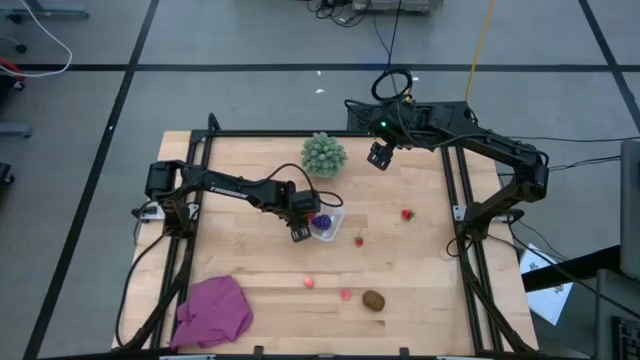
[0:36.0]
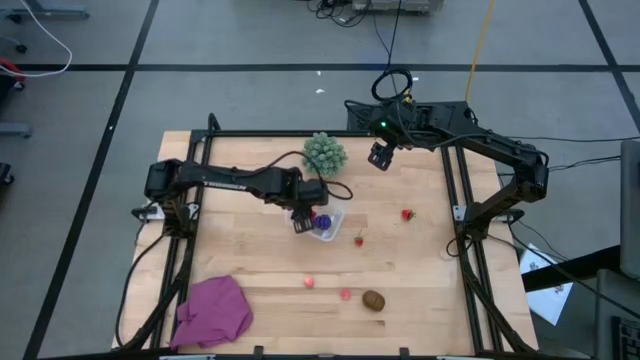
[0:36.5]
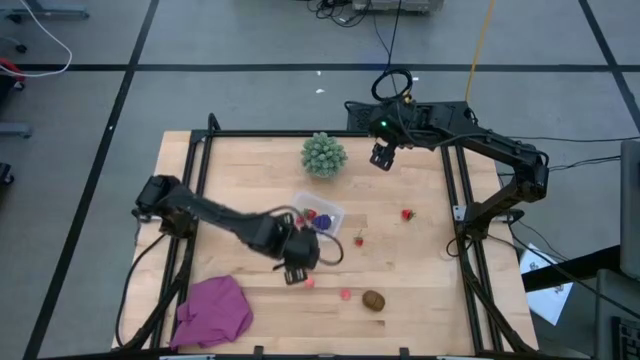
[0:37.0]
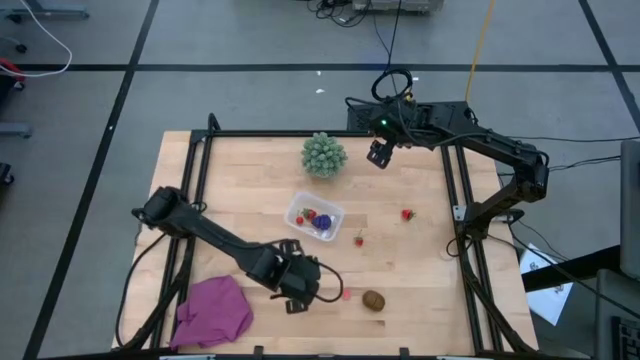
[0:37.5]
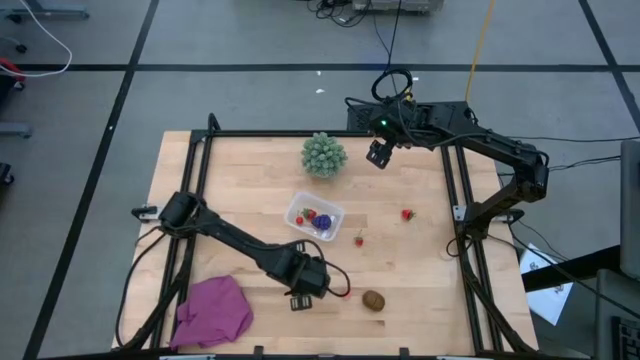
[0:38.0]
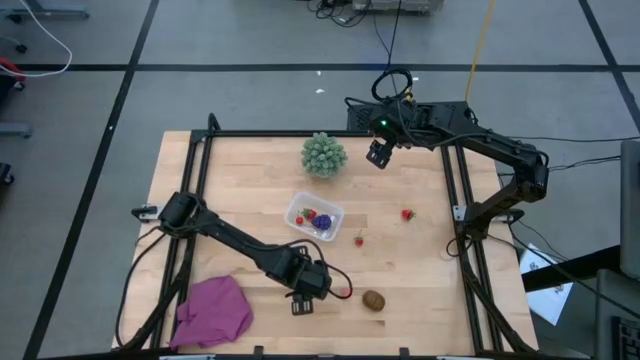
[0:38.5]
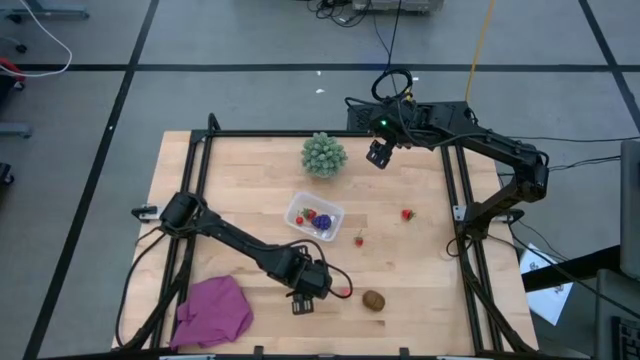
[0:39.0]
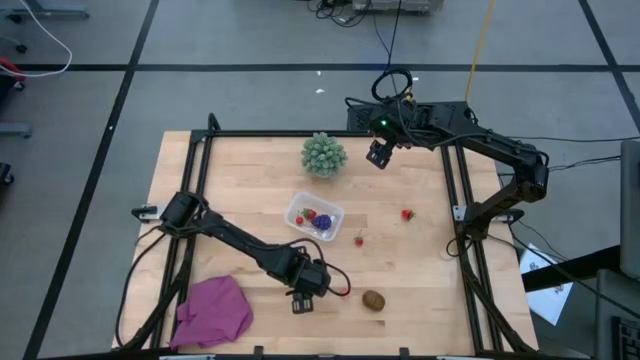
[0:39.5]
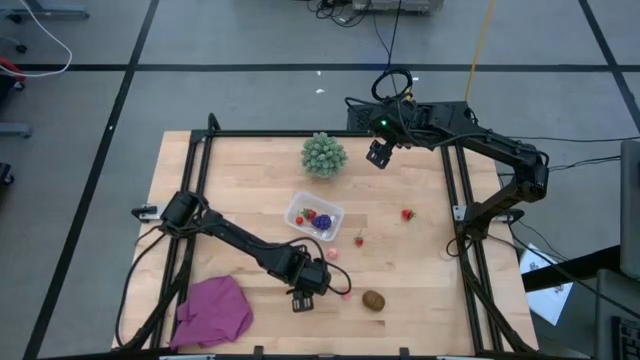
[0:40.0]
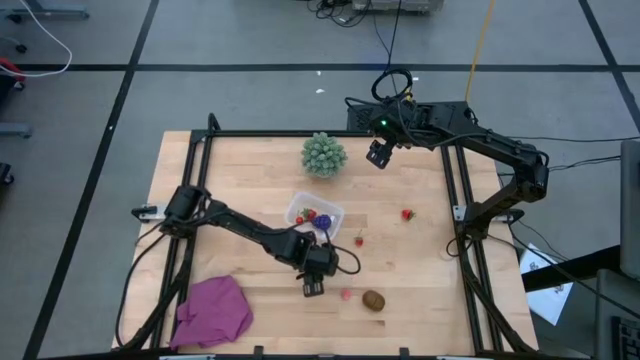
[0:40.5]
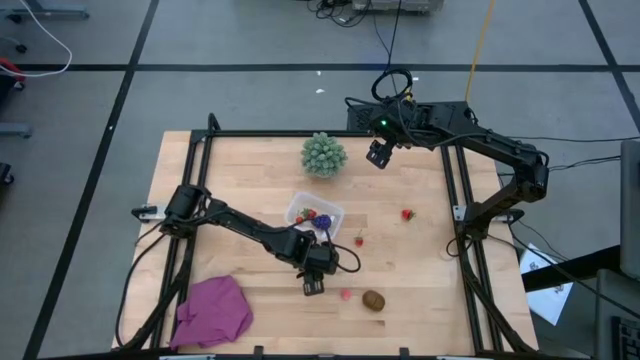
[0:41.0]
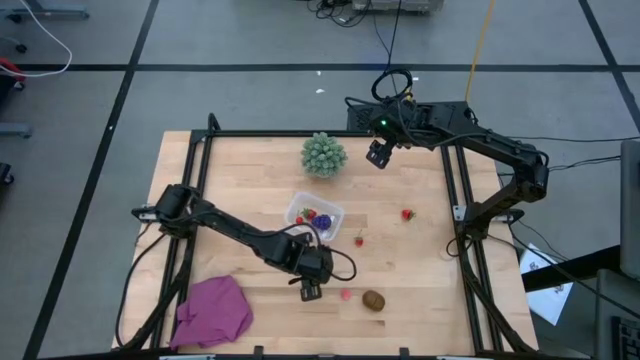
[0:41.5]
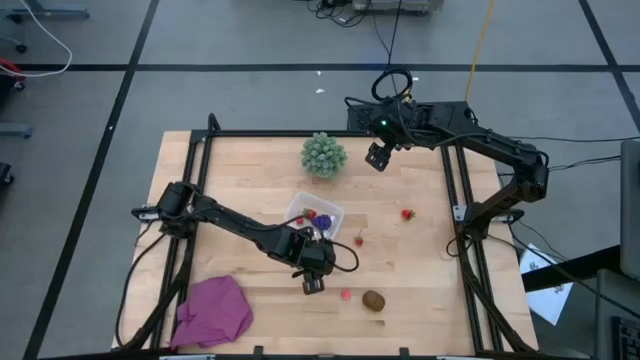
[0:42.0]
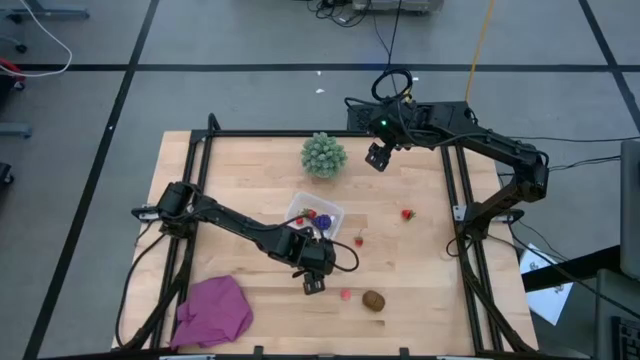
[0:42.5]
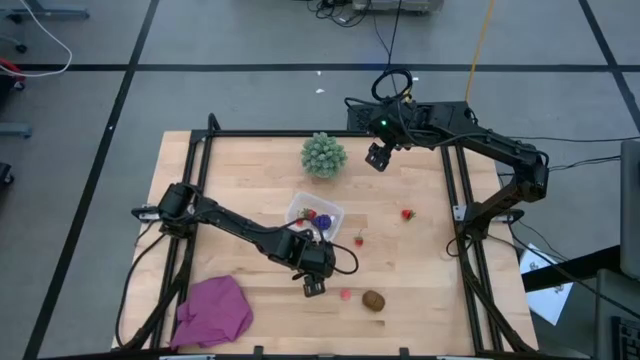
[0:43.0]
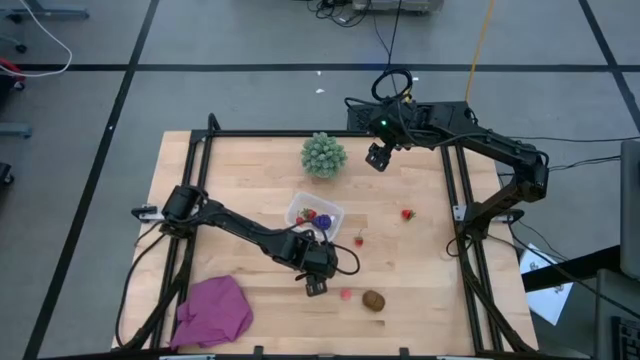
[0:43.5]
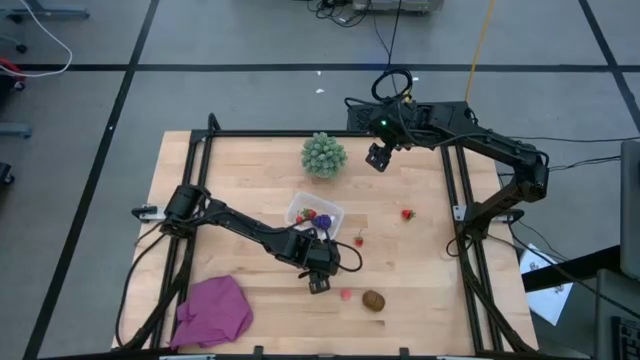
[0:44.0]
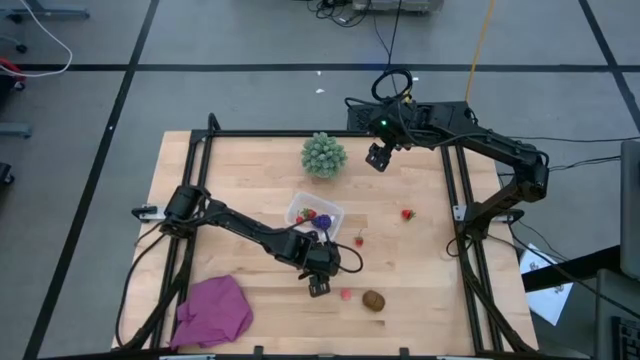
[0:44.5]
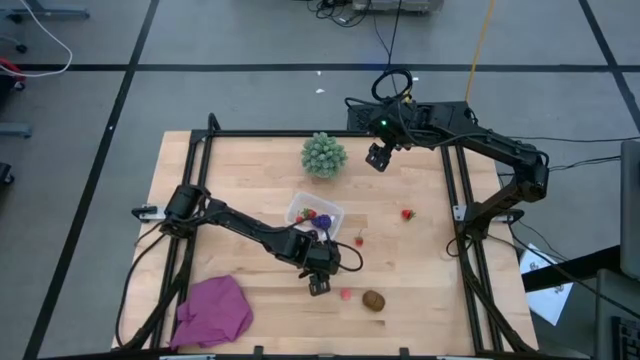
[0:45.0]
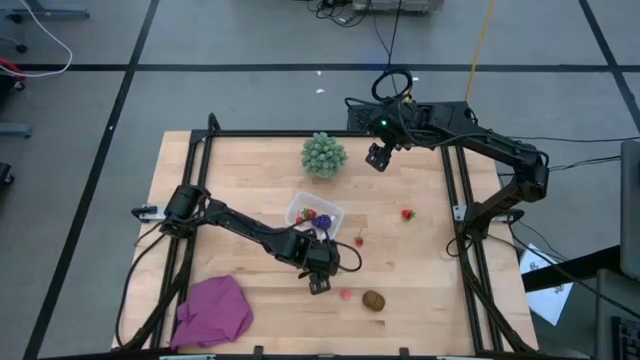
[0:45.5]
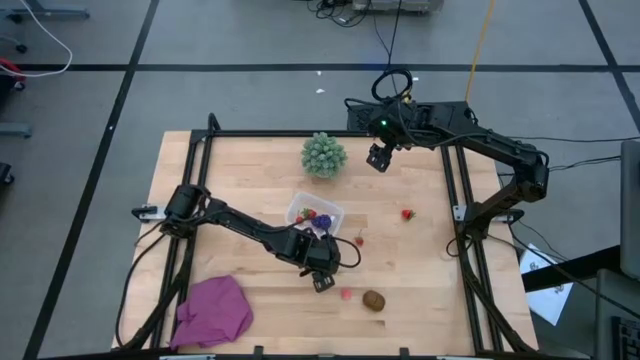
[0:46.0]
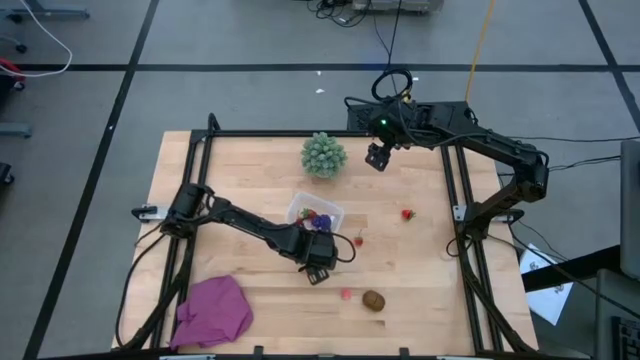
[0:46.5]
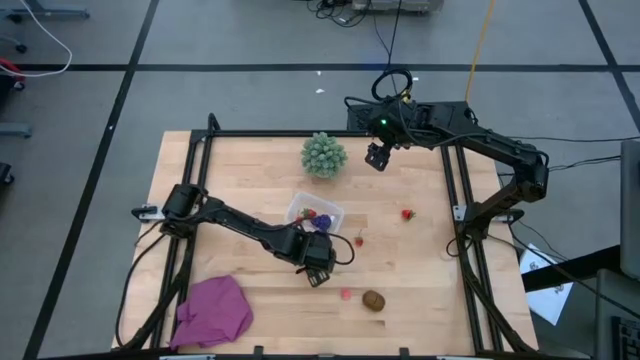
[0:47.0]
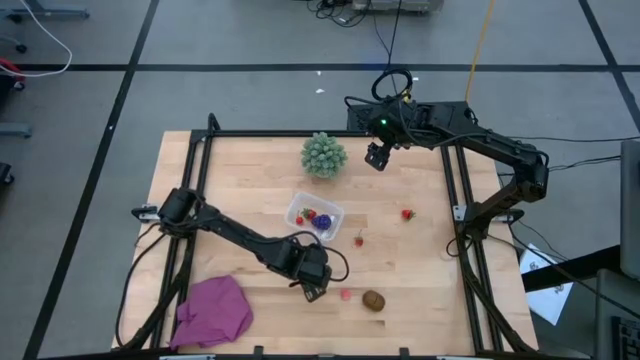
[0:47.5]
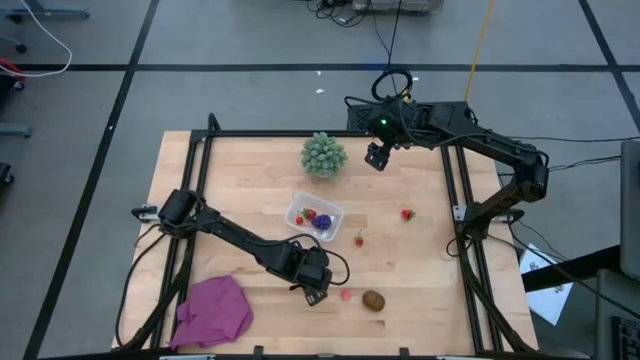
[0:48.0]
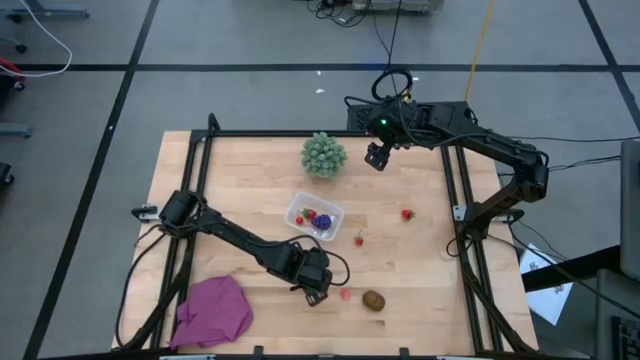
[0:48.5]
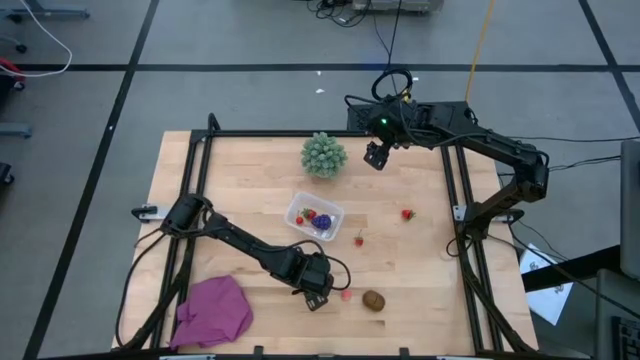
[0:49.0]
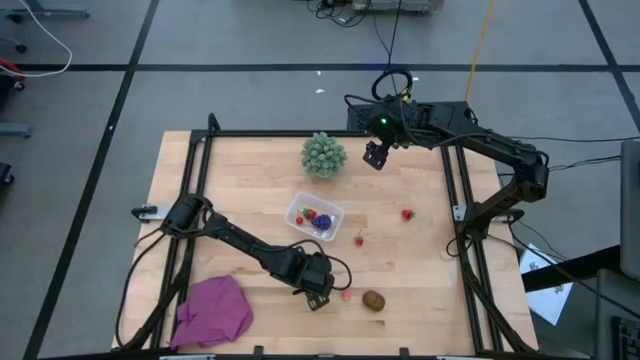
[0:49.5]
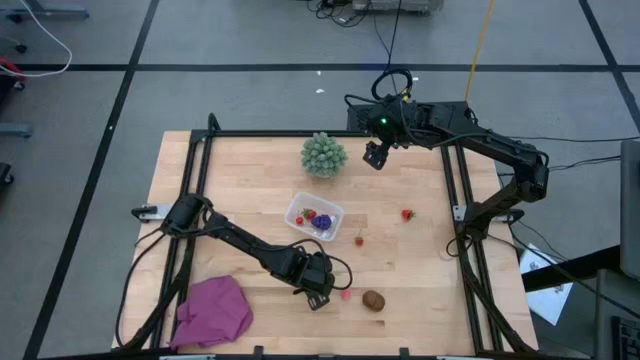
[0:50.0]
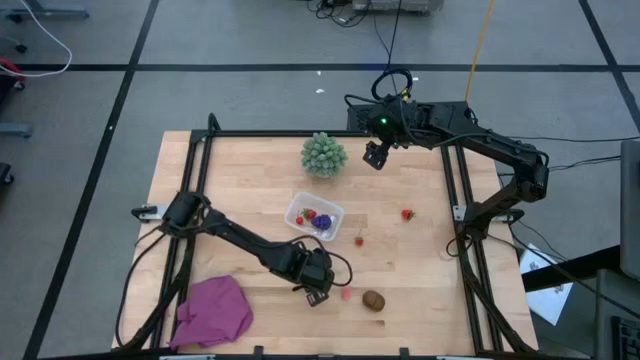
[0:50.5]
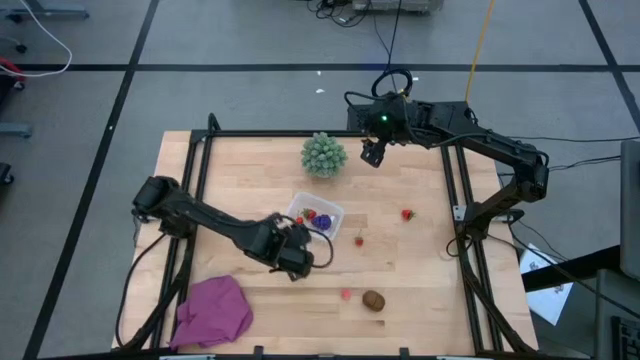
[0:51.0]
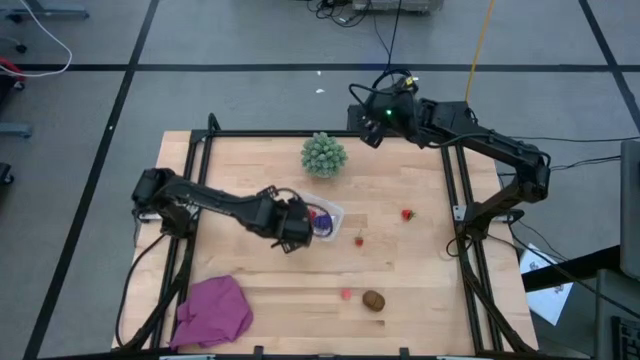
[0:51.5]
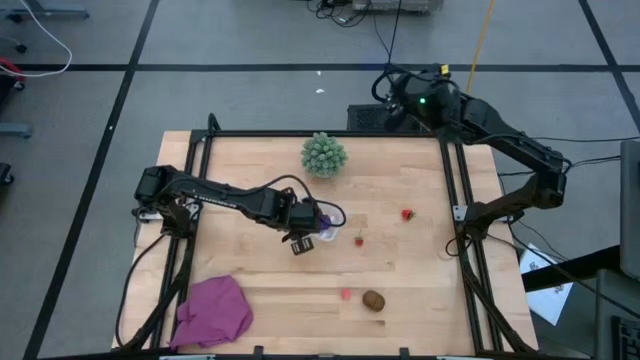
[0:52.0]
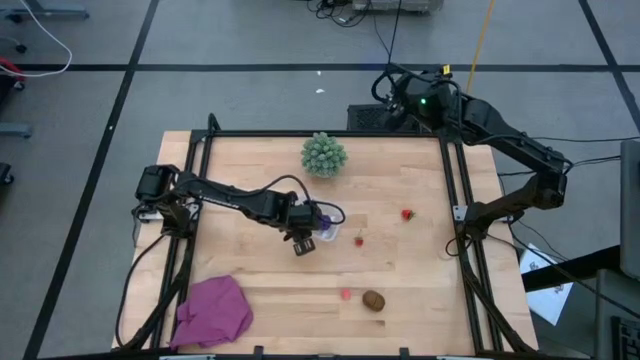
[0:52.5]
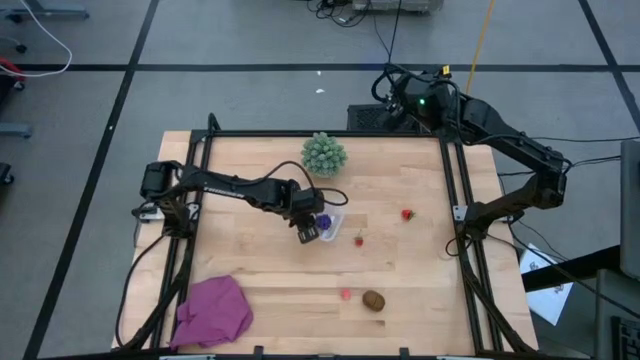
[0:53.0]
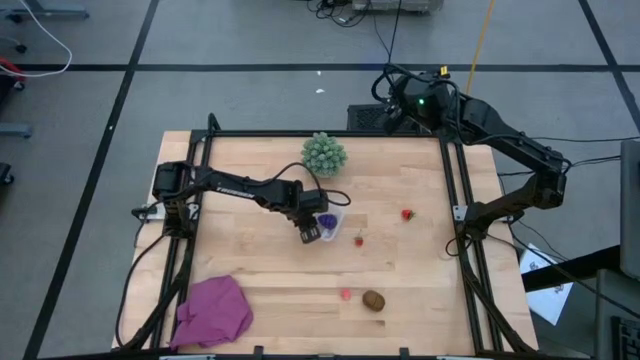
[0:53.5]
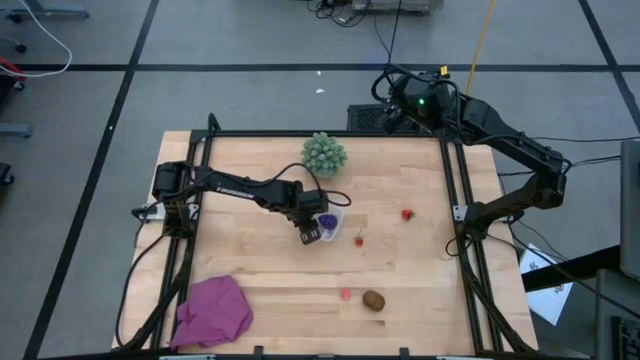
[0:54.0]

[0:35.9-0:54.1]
Task: Pick and placing Produce into tupperware
Put the left apricot into the transparent bin

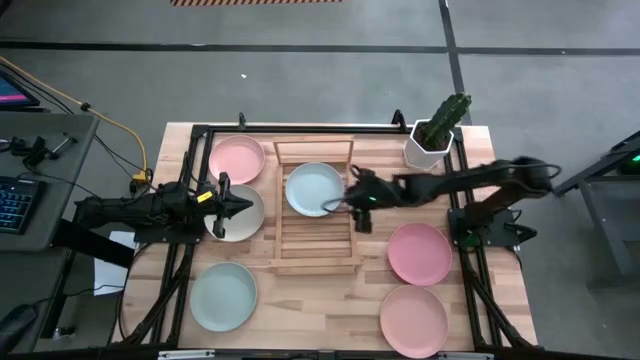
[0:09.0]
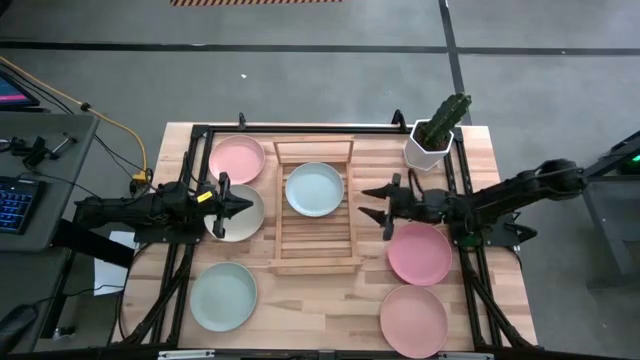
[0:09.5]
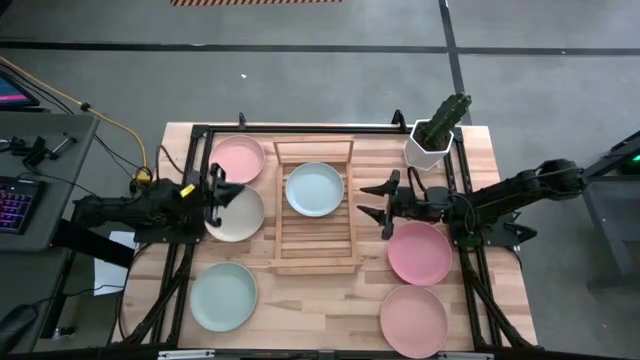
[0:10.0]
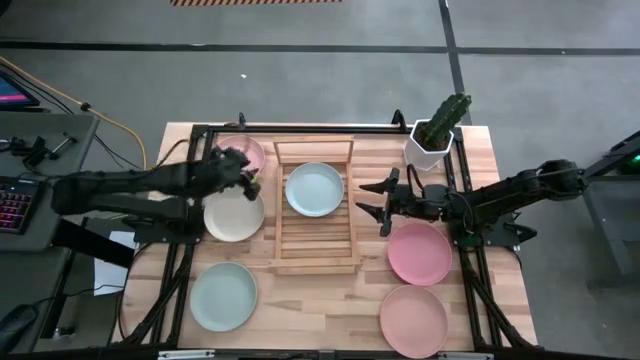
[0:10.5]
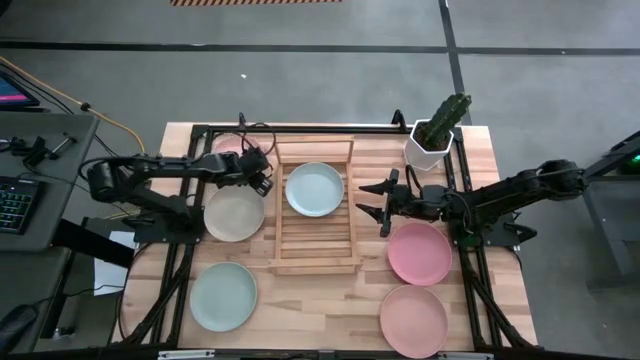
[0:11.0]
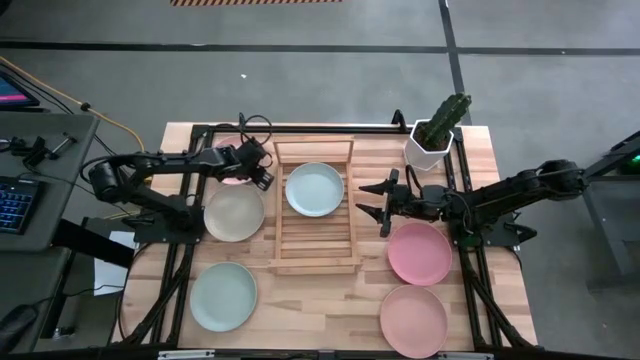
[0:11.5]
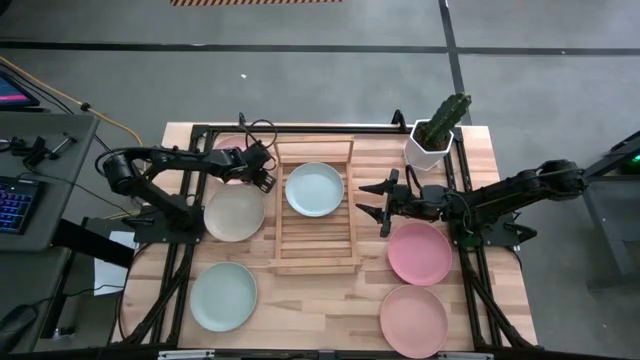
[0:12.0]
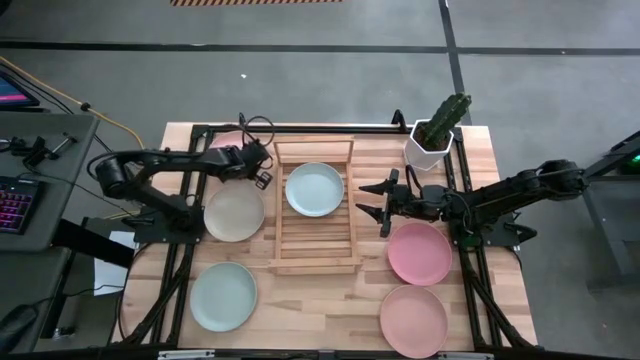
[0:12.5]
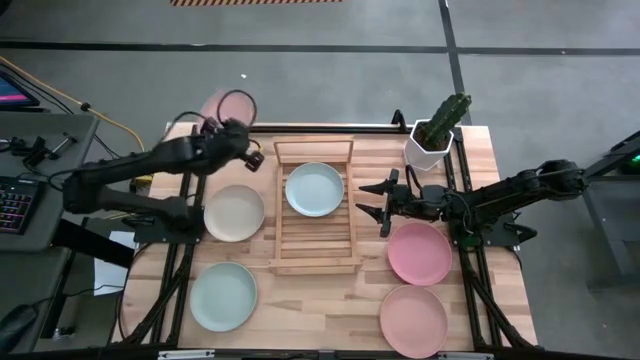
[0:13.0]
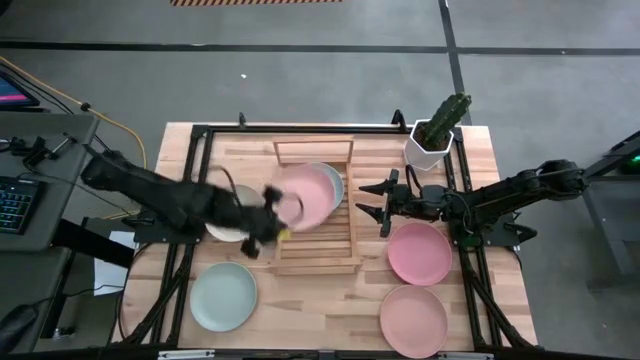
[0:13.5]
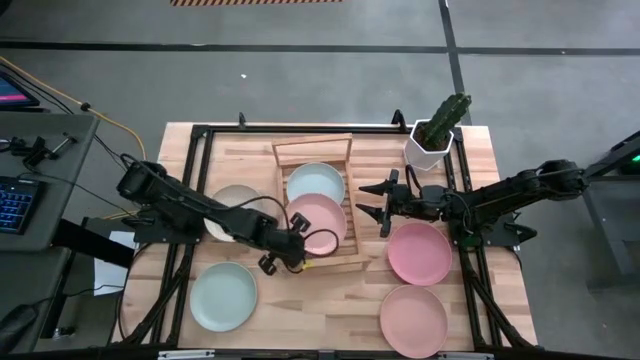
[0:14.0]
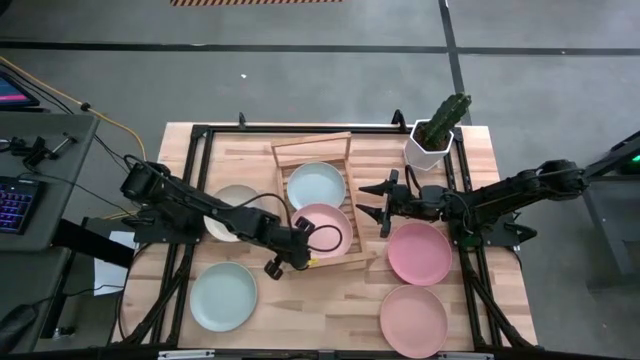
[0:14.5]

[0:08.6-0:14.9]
Task: Place and stack plates onto a shelf
Put the top pink plate on the shelf
